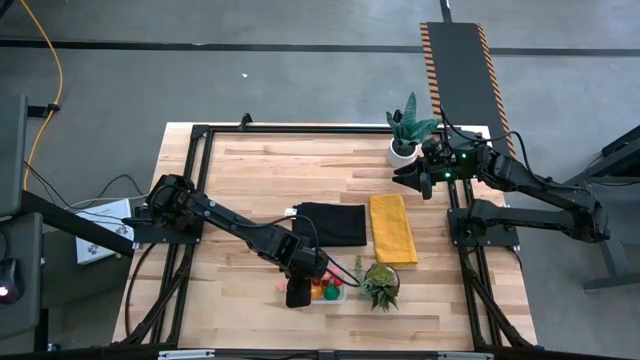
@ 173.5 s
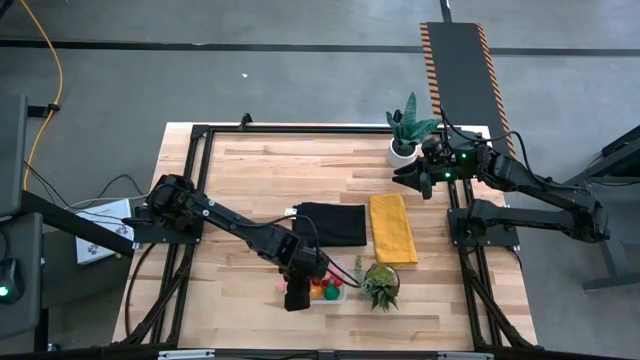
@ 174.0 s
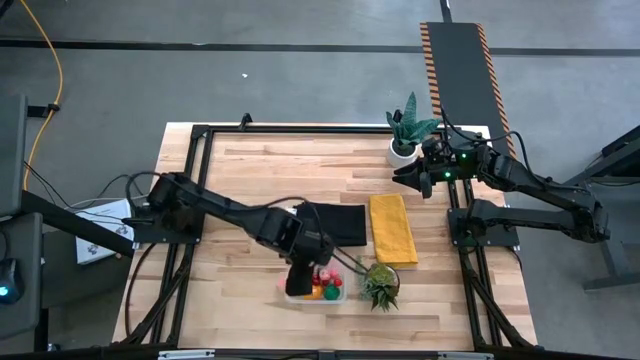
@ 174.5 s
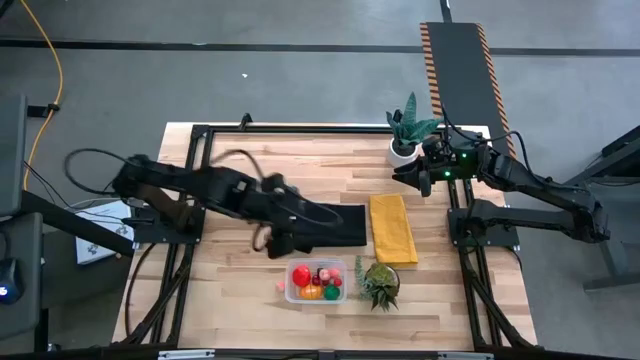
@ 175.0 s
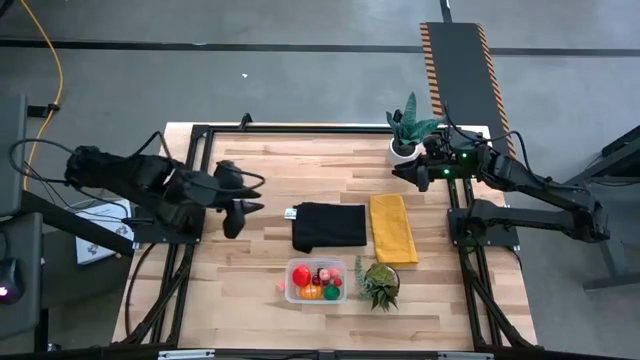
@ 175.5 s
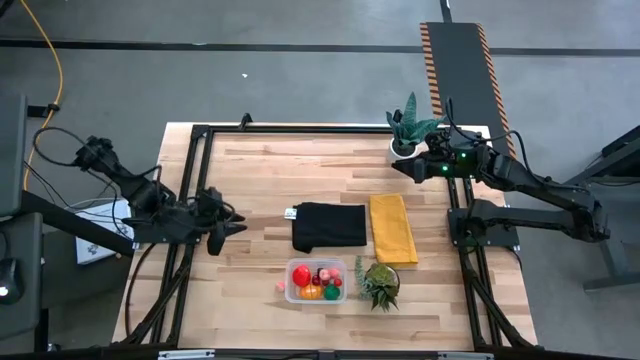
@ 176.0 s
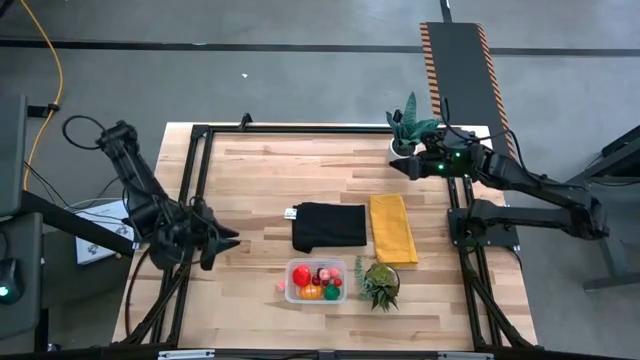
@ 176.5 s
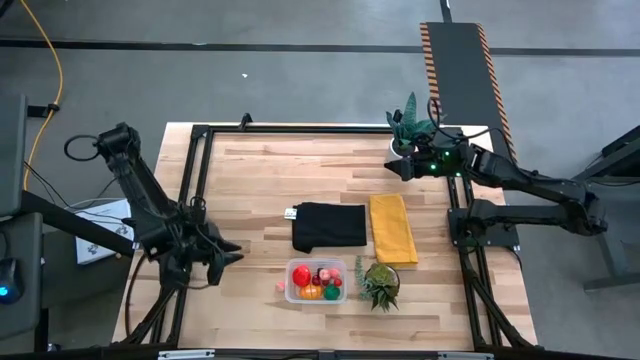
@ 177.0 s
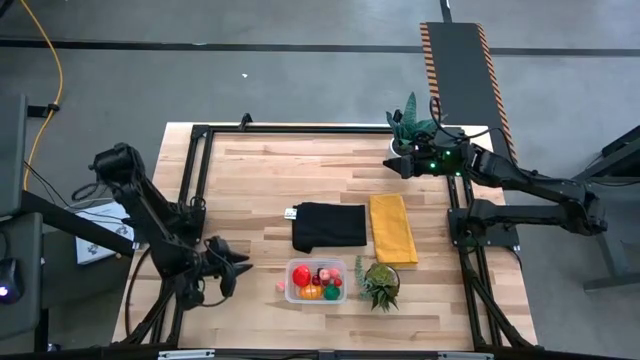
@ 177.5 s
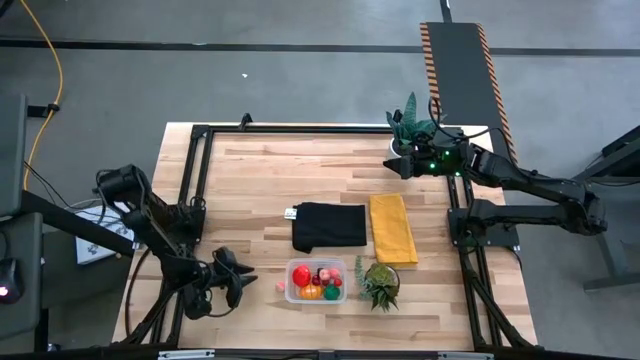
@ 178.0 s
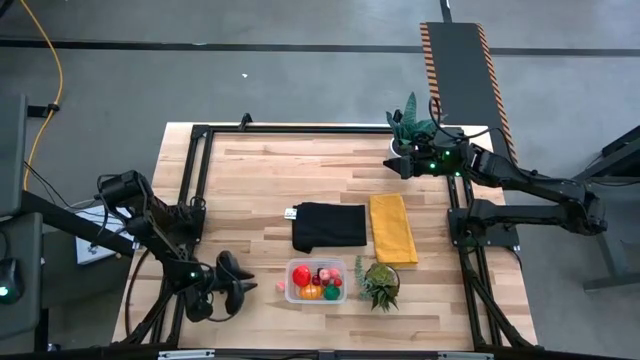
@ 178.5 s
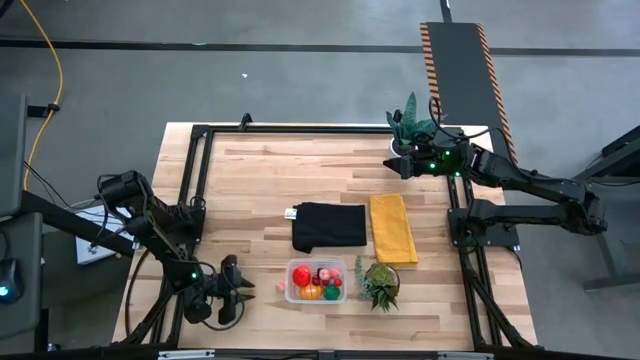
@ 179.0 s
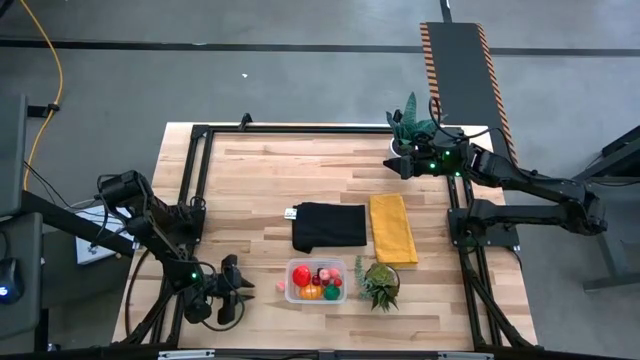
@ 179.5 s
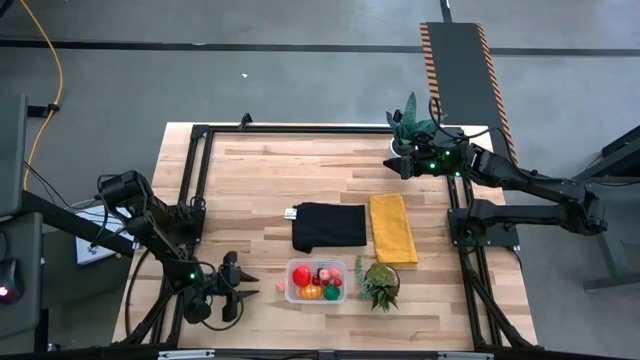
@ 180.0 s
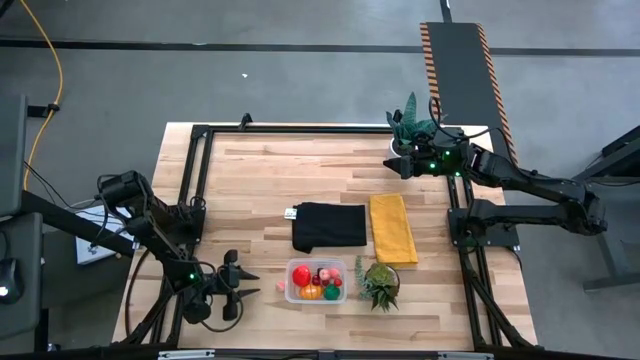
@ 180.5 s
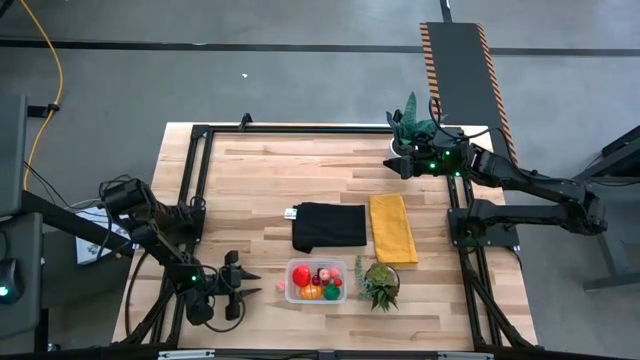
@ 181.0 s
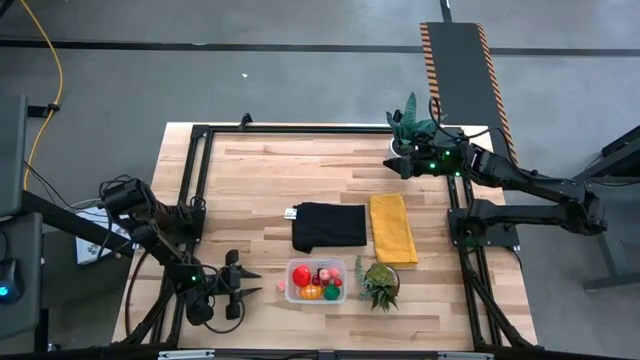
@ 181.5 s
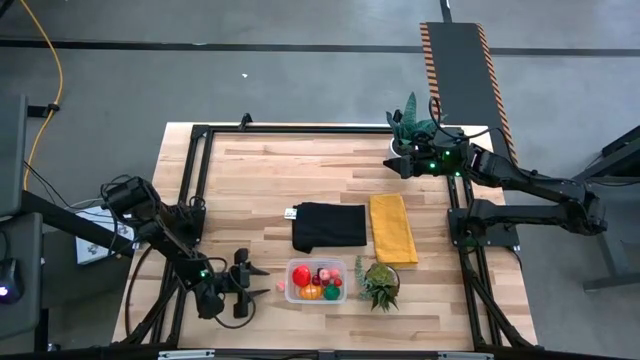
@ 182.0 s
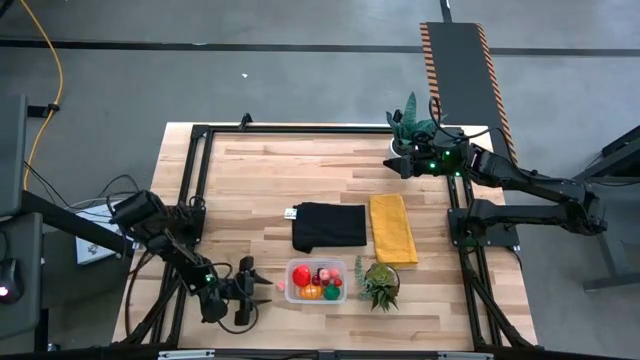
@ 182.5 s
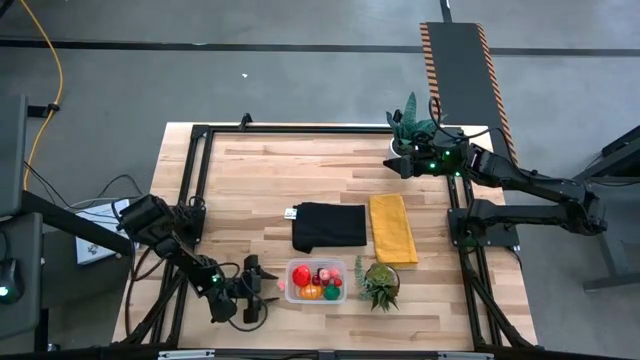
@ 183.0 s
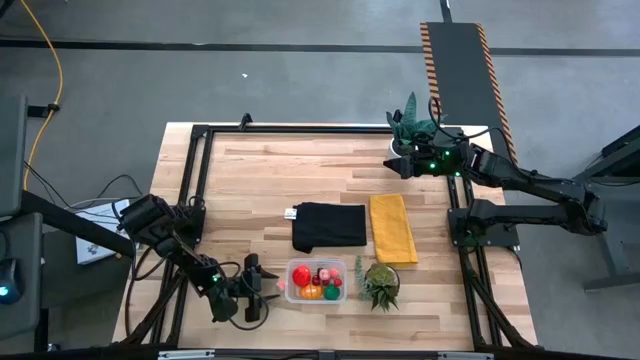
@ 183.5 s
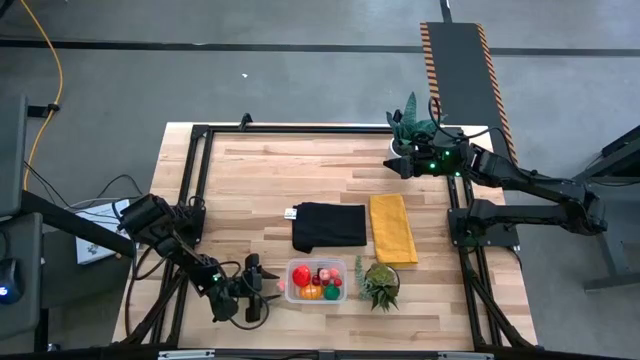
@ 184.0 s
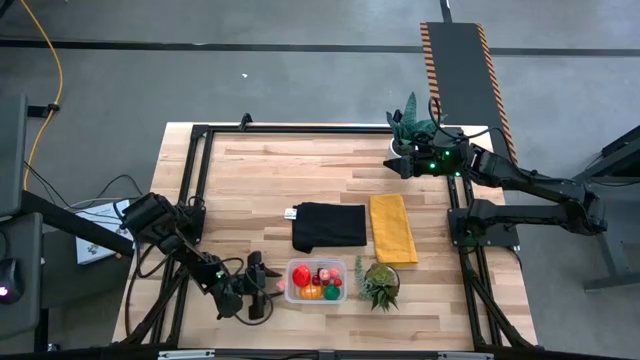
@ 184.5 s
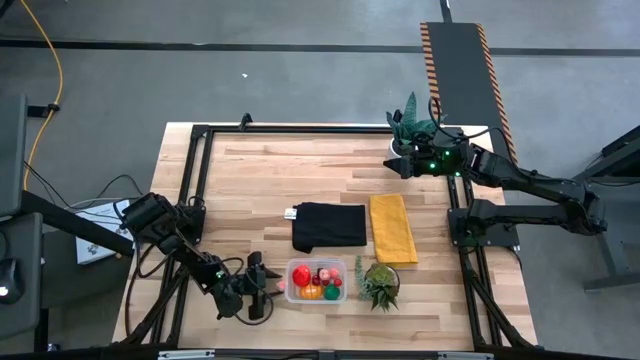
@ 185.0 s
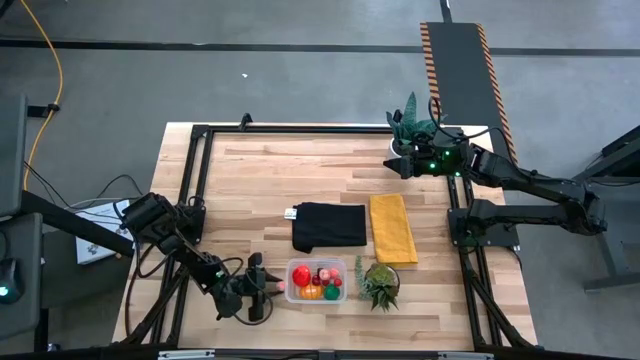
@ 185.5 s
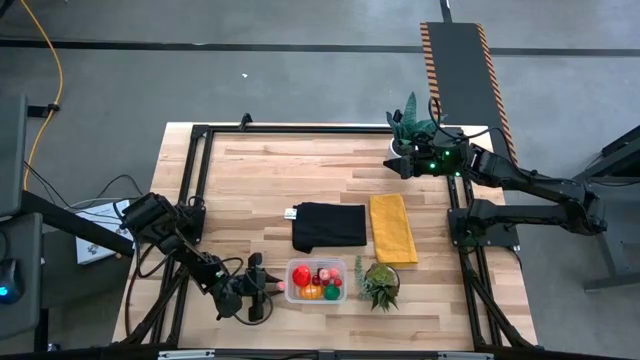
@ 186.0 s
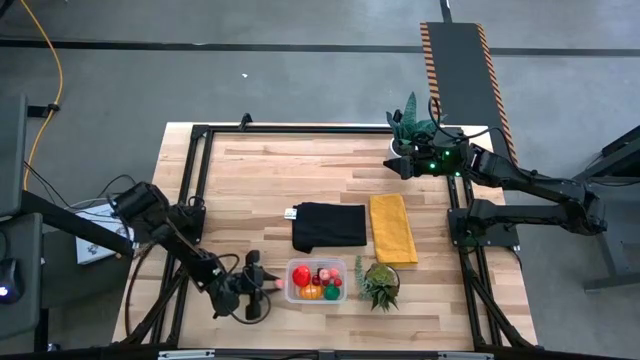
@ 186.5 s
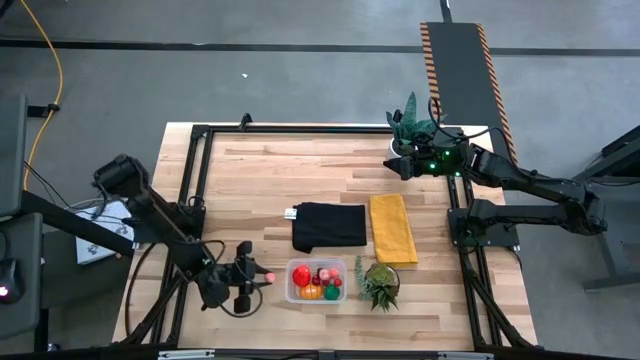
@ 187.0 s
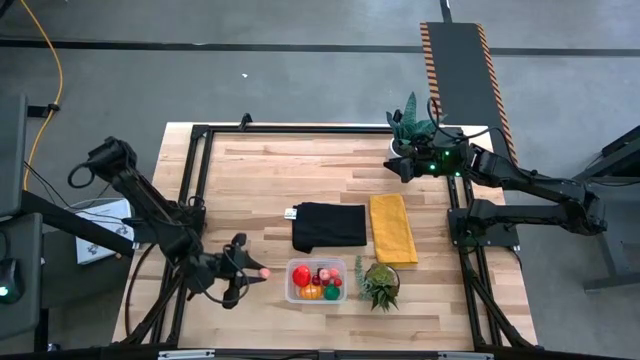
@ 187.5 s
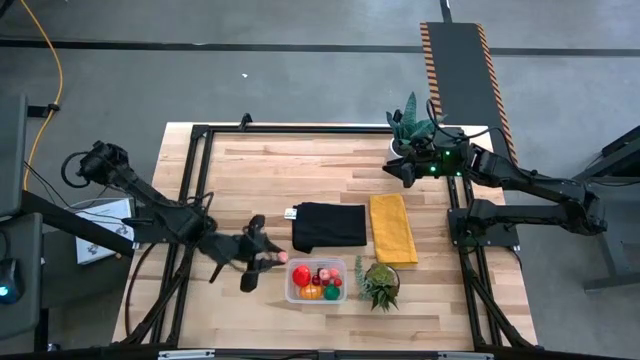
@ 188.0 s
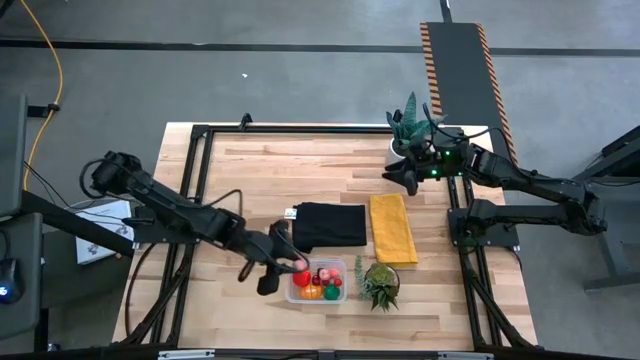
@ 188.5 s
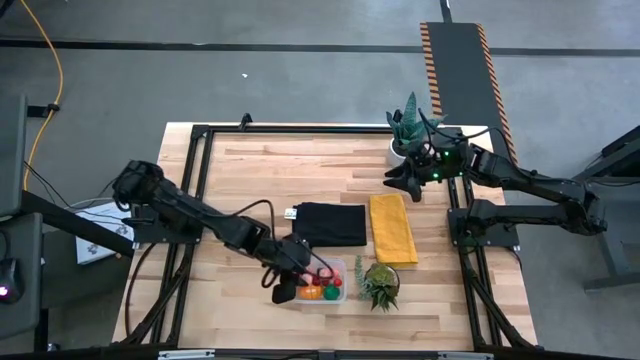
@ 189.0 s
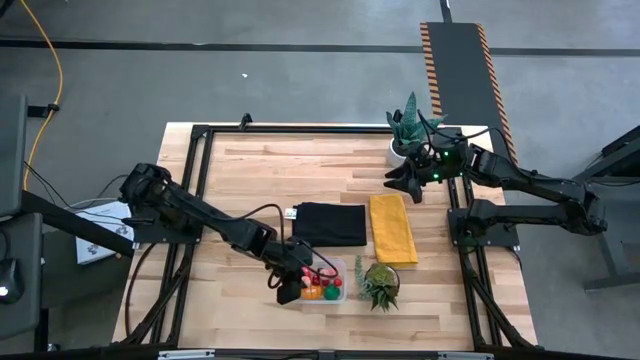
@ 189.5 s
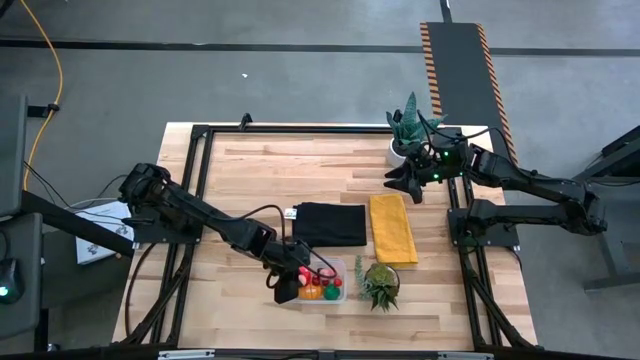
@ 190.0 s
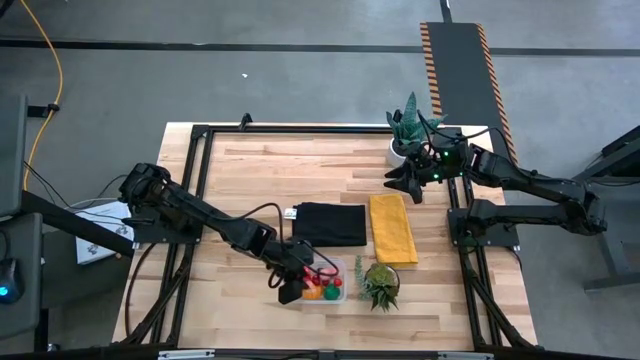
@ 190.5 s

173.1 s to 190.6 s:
Task: Pick and placing Produce into tupperware
Put the peach into the transparent bin

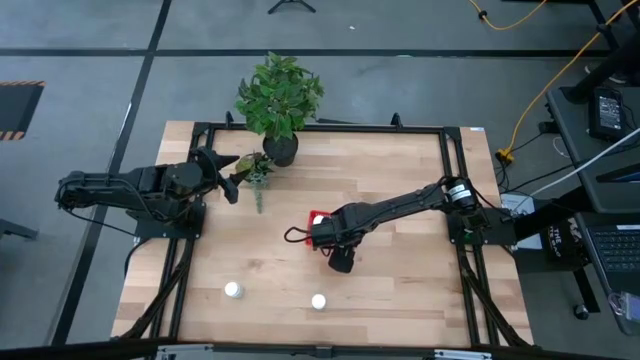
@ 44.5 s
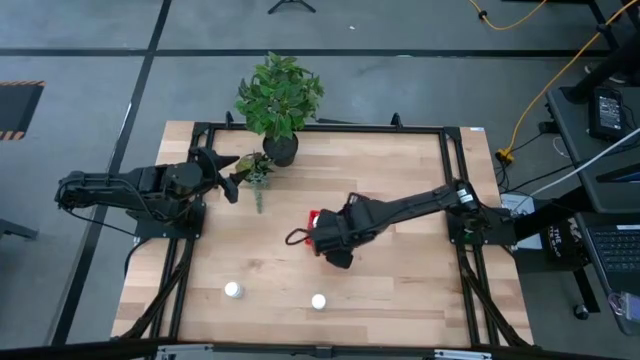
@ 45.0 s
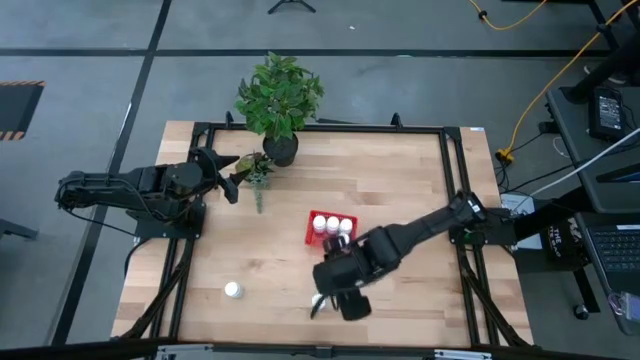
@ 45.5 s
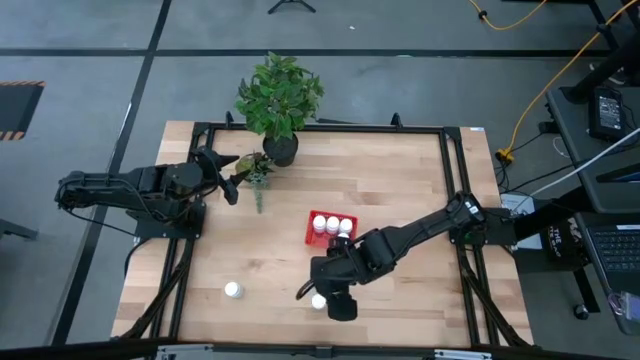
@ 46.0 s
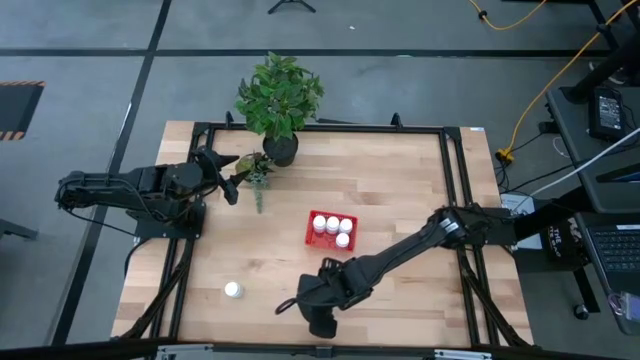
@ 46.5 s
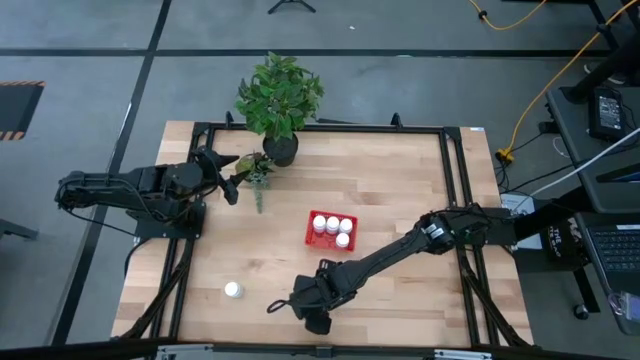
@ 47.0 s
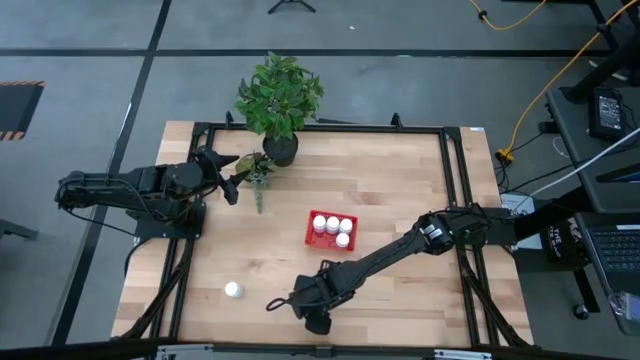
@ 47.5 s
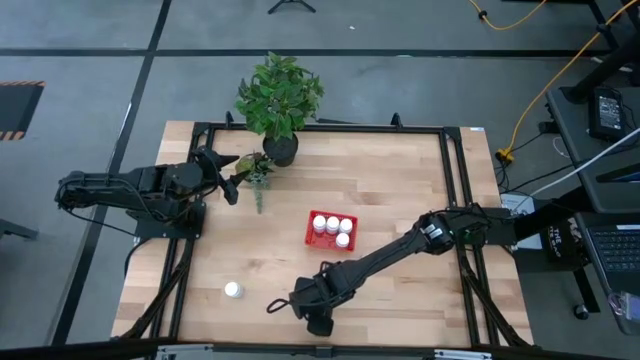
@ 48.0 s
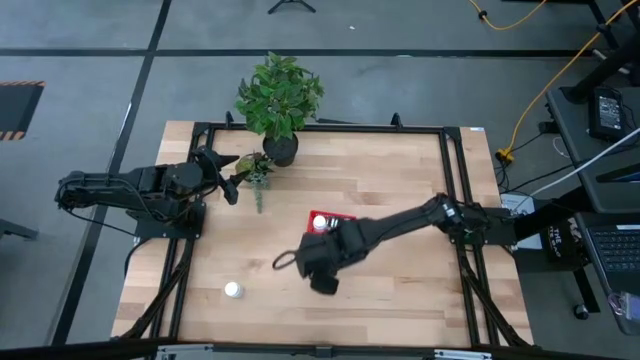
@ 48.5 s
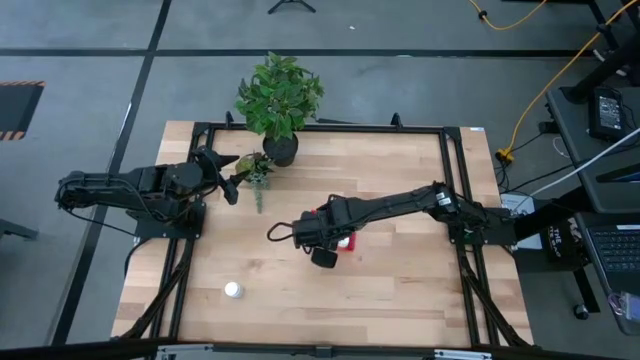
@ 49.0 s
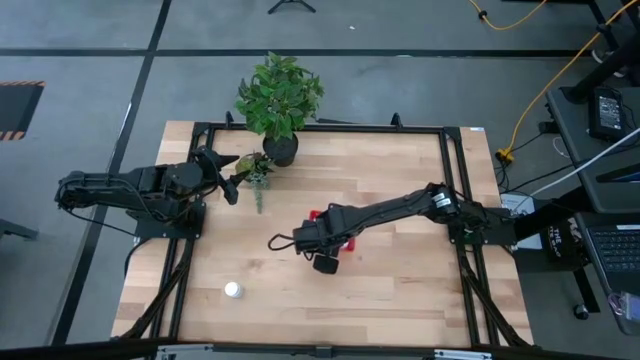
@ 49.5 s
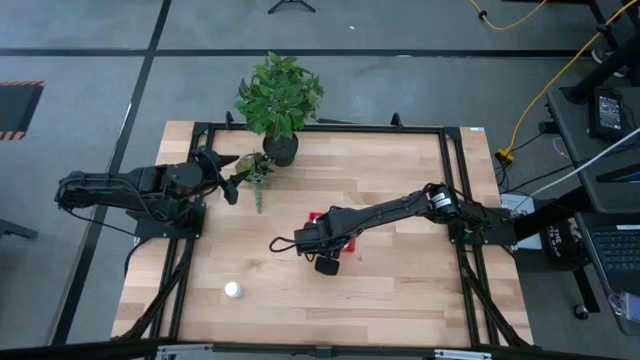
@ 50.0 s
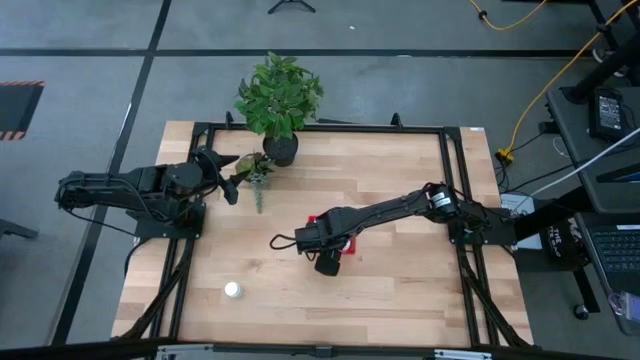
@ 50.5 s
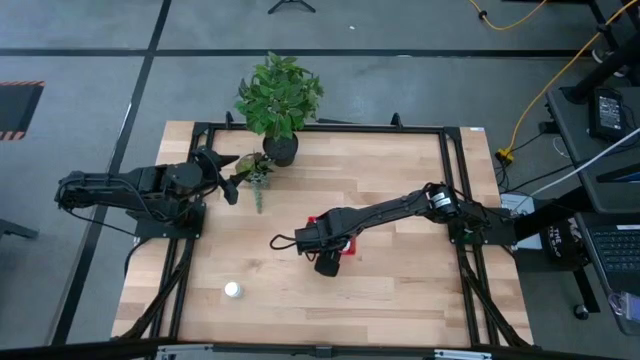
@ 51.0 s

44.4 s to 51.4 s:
Task: Pick and place pill bottles into a basket
Put the white medicine bottle into the red basket
